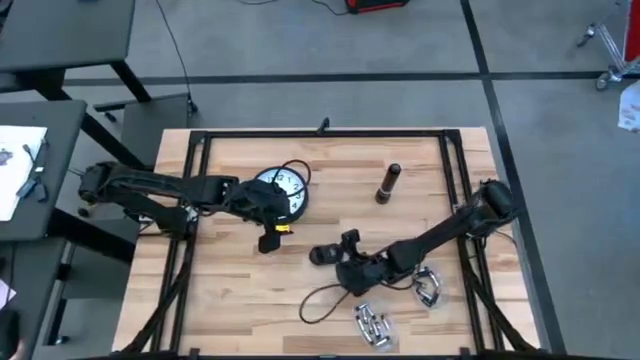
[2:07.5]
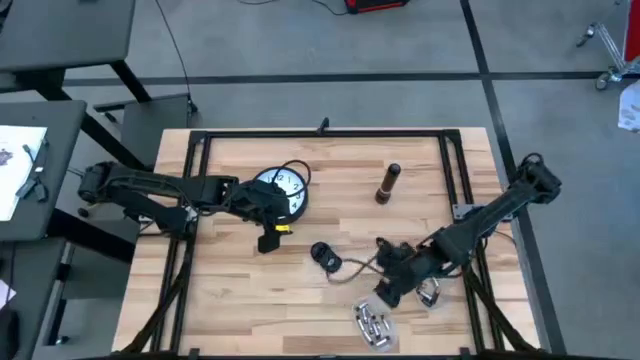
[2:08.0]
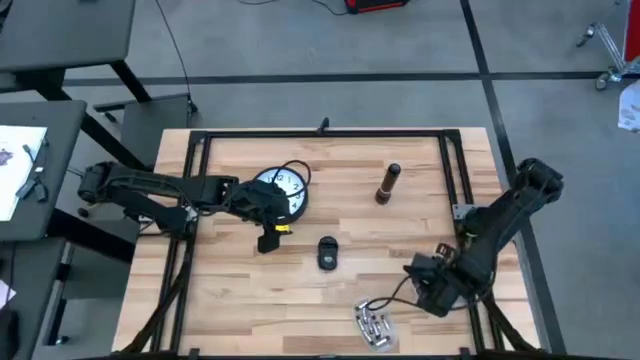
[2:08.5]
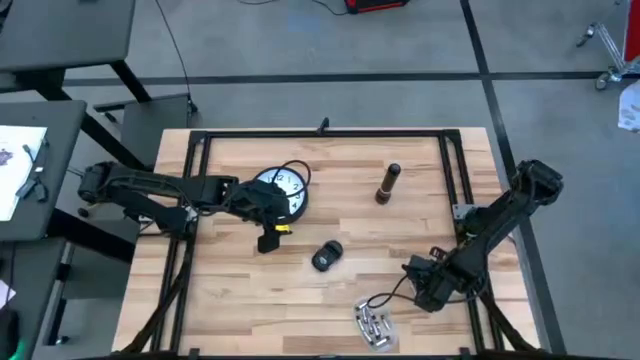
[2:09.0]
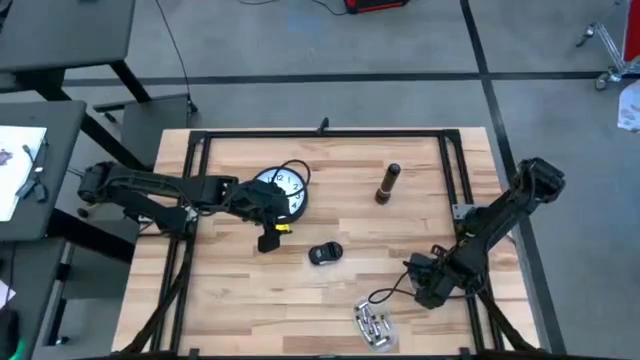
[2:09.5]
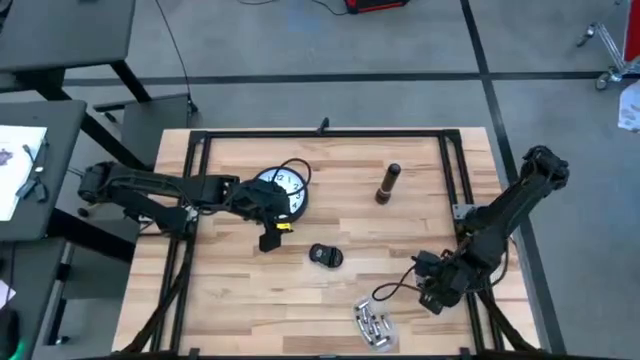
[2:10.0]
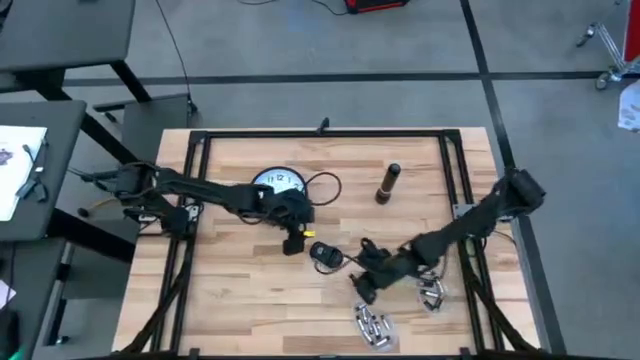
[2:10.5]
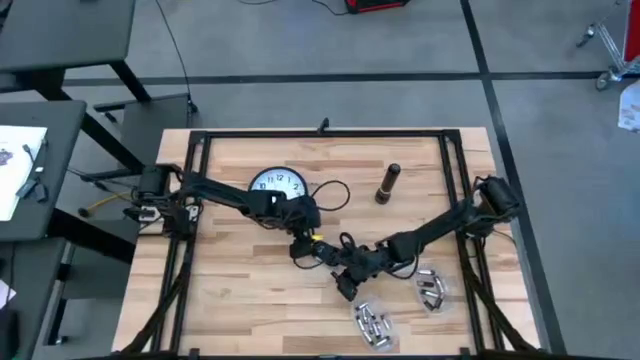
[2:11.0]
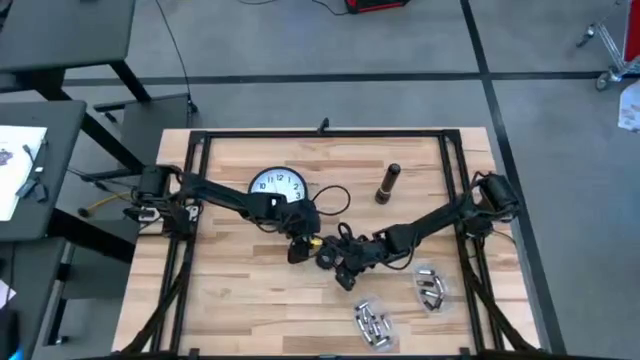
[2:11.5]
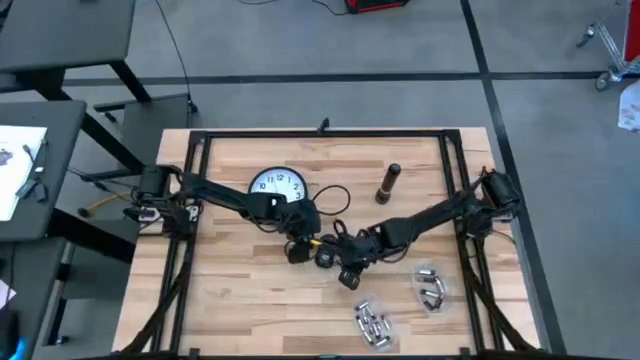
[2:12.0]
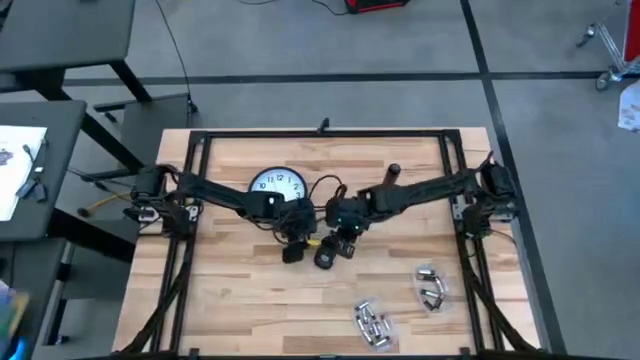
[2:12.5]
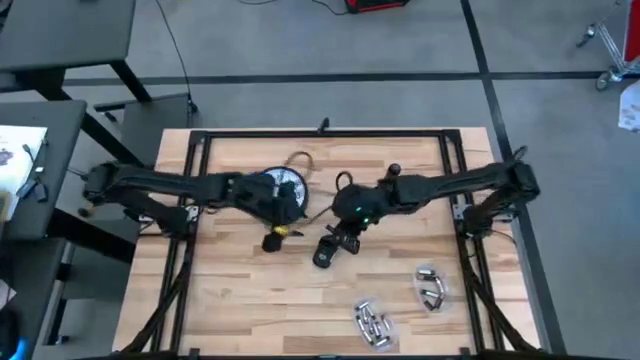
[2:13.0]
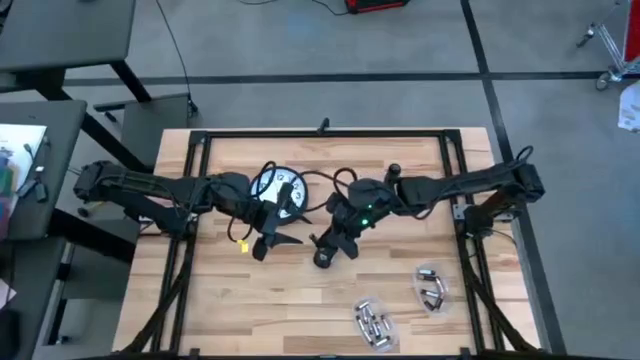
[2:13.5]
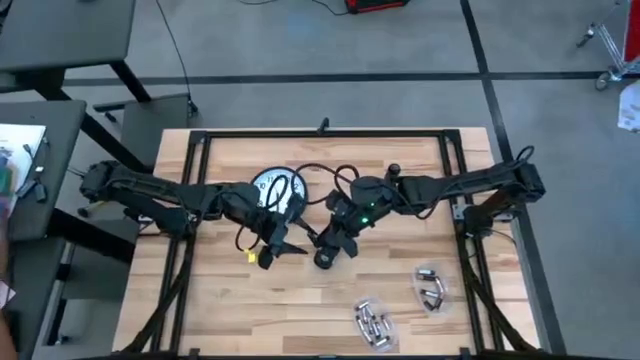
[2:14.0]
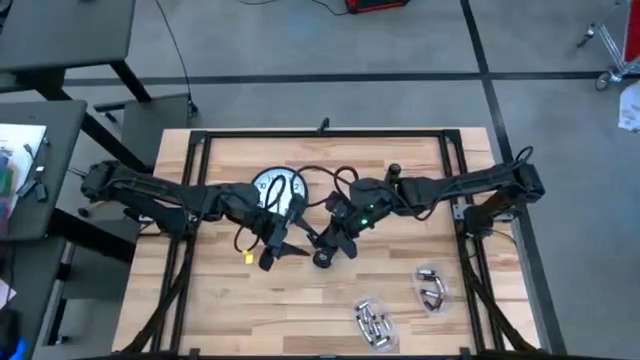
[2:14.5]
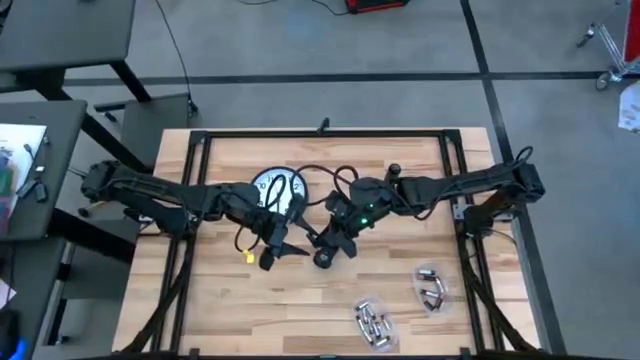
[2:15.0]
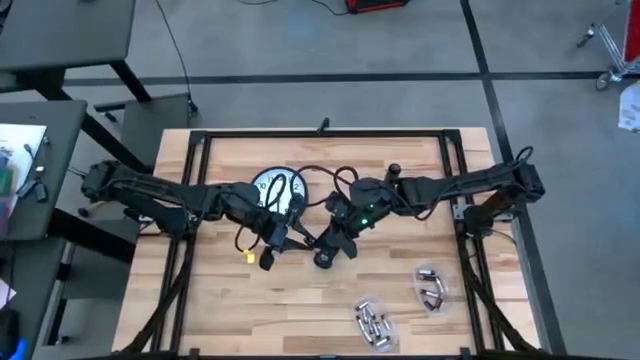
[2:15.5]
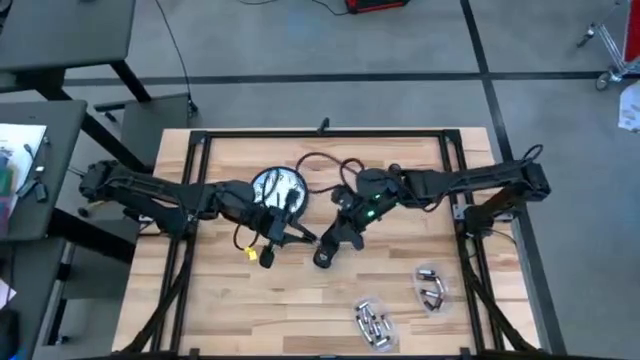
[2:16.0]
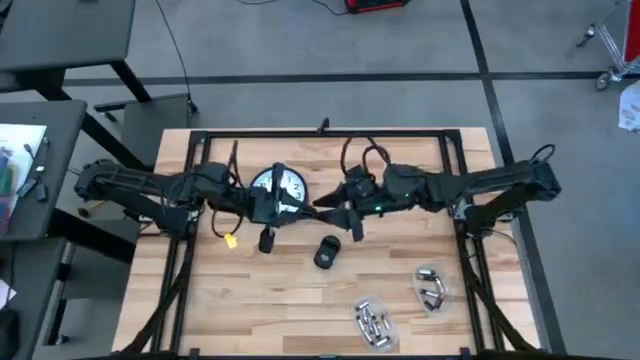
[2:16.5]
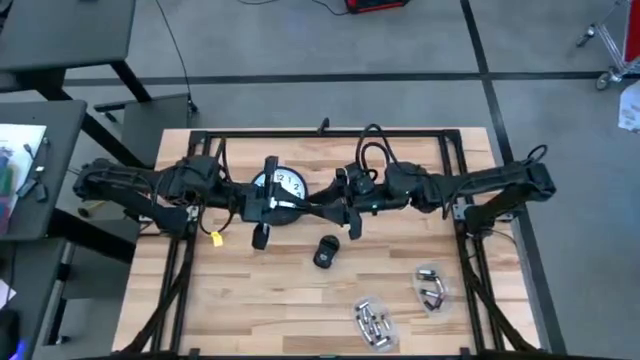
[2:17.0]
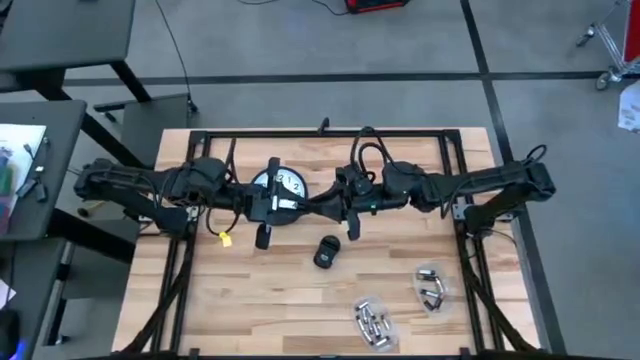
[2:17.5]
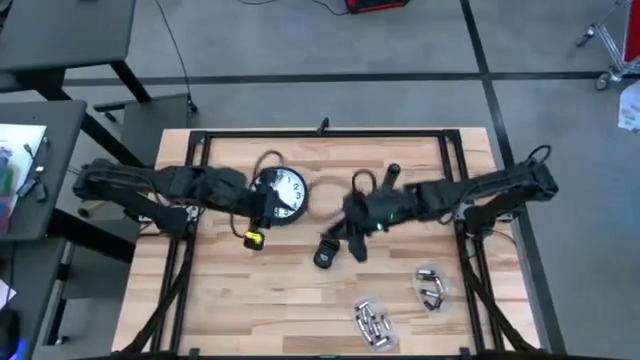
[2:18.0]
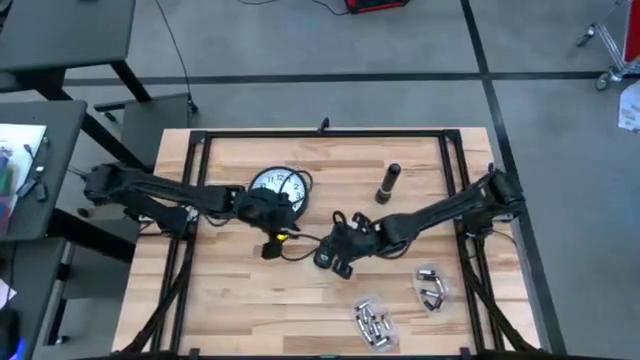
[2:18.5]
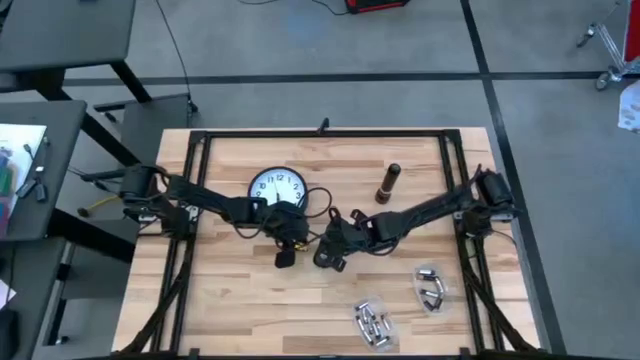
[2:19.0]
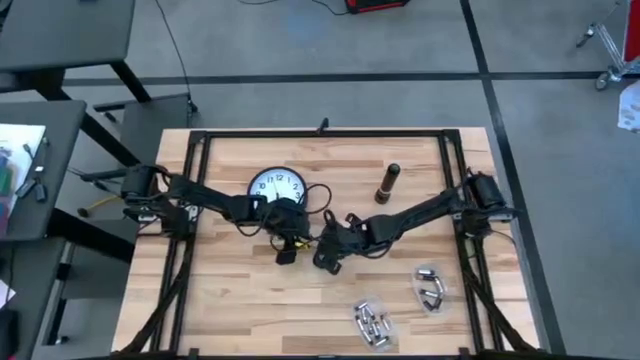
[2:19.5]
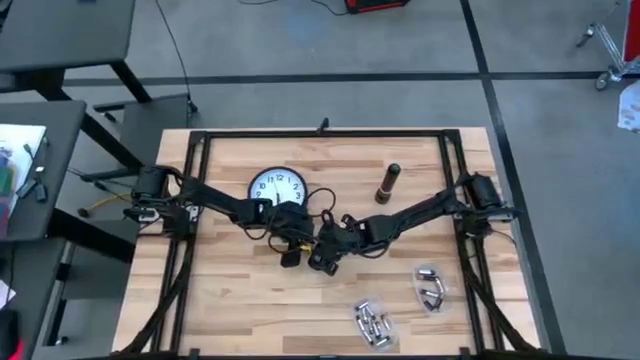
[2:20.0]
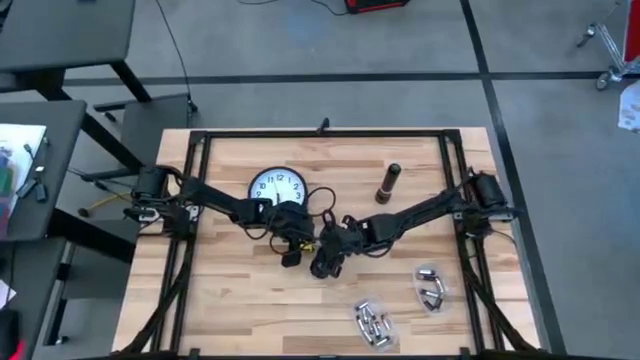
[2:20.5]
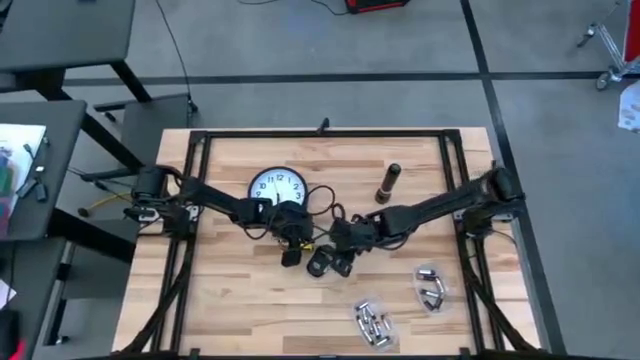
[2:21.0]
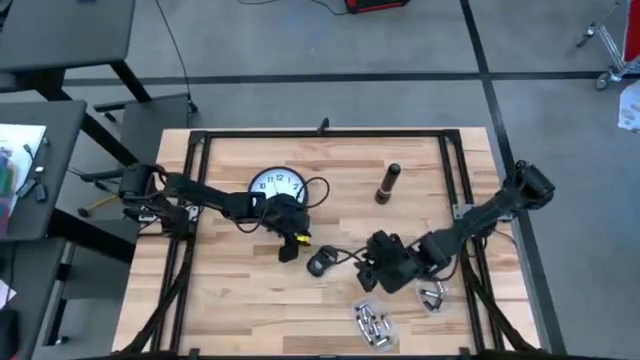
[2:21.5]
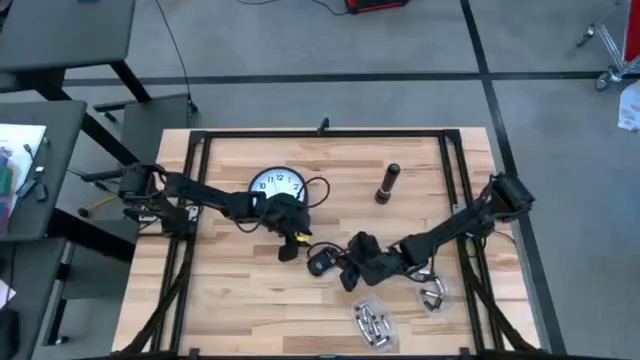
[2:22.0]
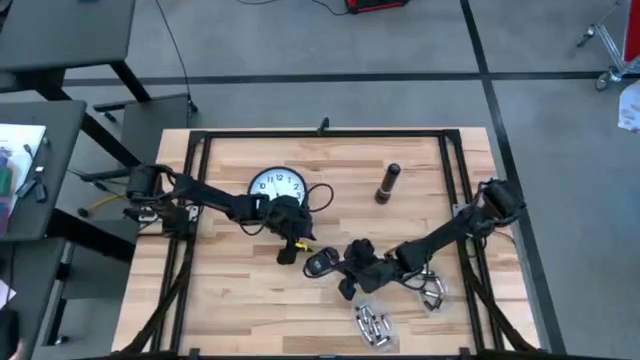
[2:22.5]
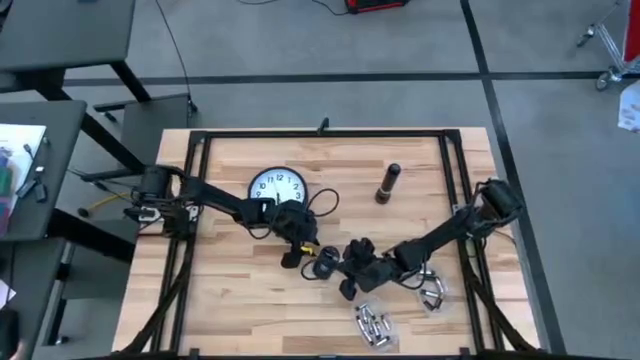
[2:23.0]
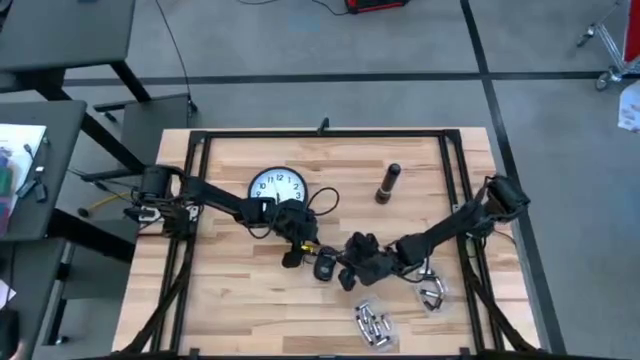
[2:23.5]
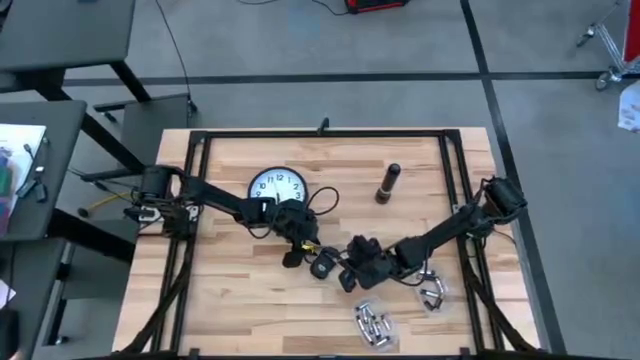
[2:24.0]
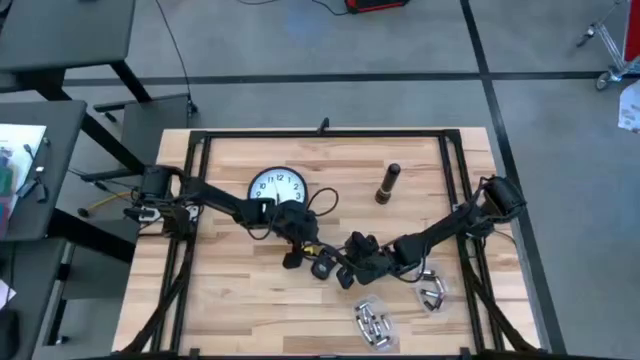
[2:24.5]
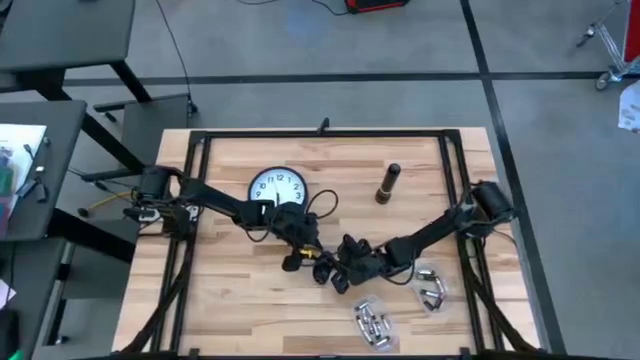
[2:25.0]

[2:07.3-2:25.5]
Task: Insert battery
Insert the brown battery into the black computer mouse battery compartment

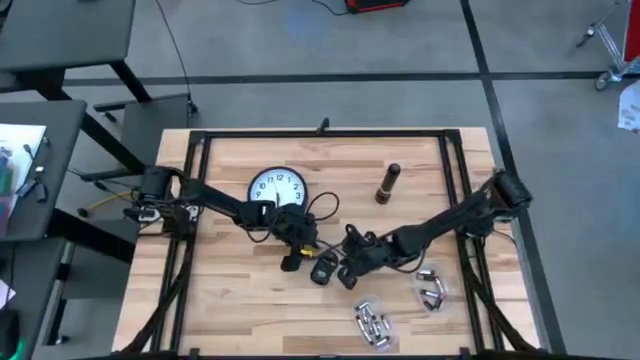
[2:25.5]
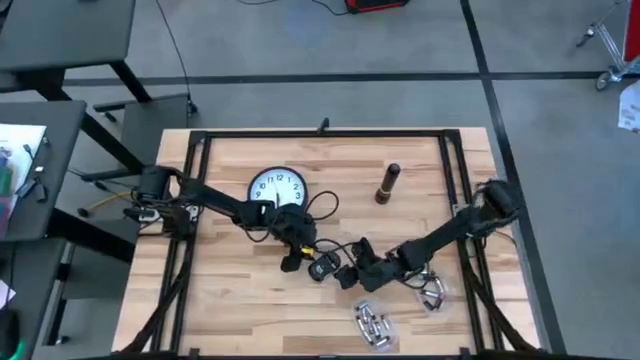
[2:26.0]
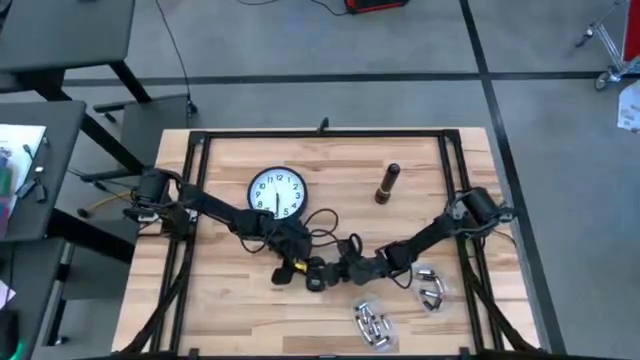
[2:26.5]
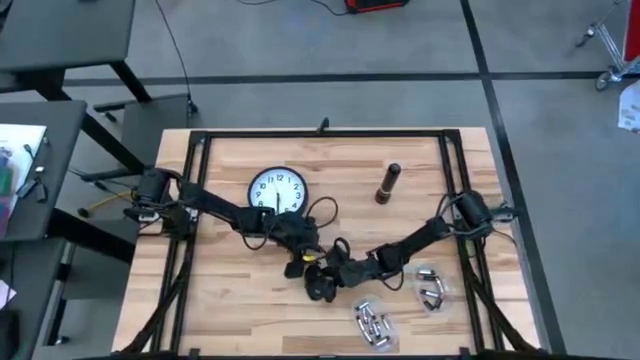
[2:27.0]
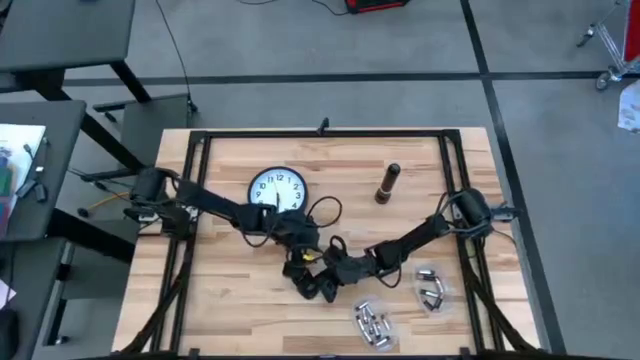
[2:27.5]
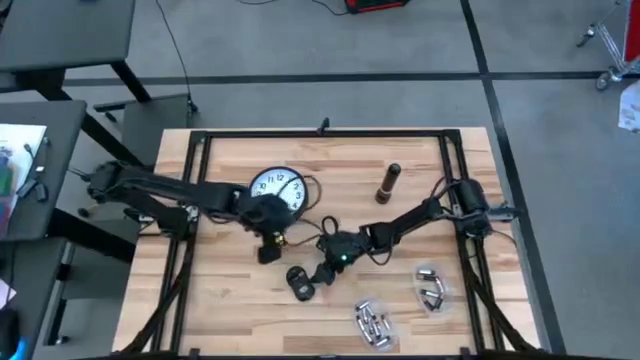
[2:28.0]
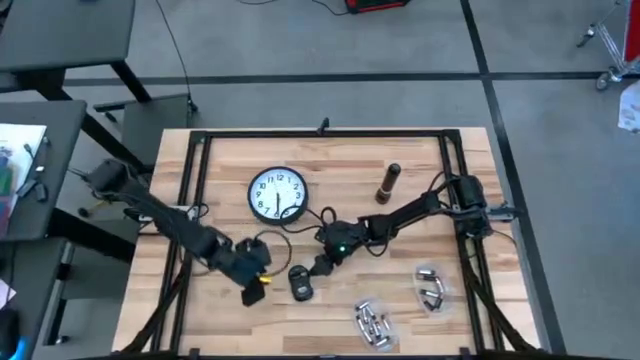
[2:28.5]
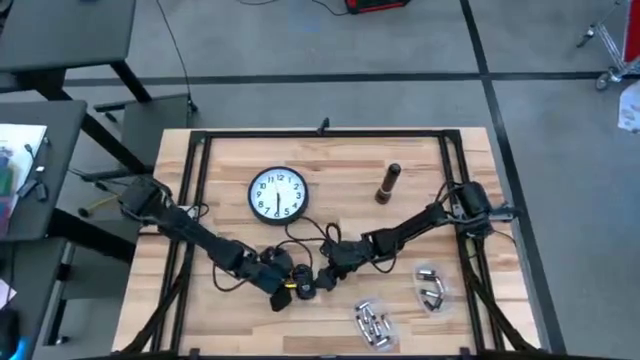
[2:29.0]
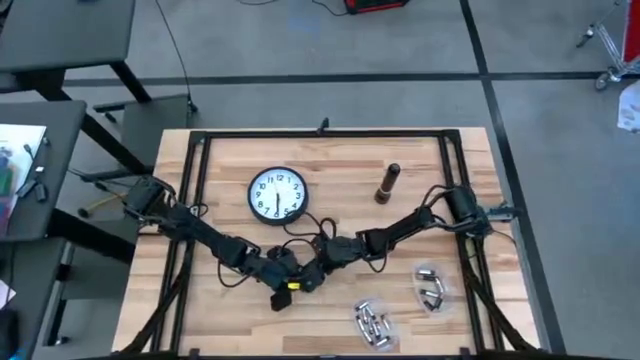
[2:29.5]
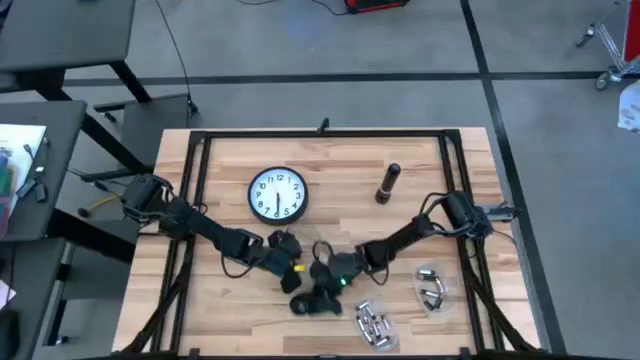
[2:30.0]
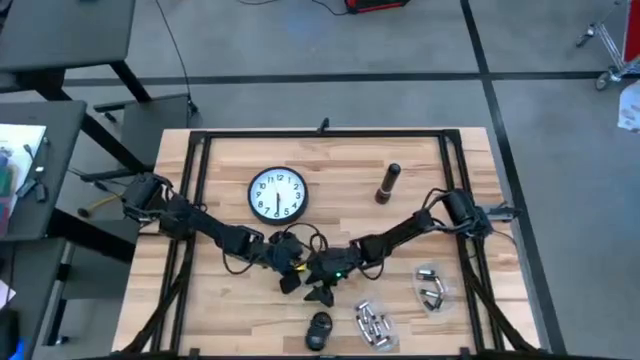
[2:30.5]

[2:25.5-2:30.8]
Adjust the black computer mouse
